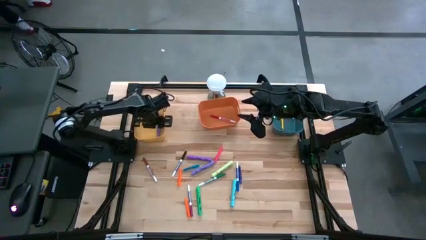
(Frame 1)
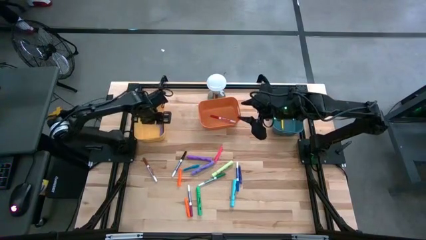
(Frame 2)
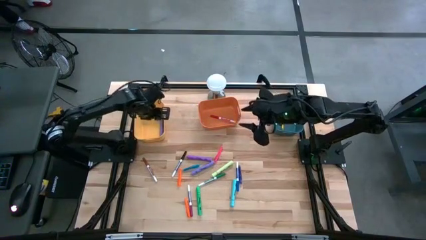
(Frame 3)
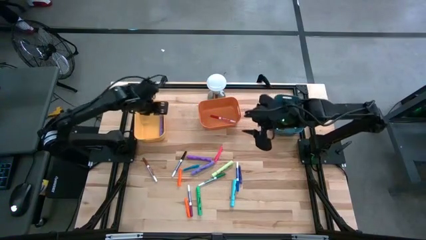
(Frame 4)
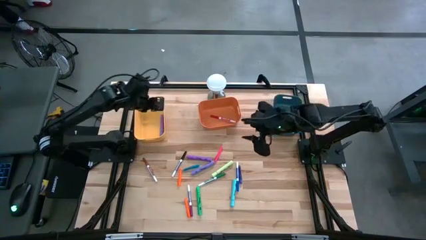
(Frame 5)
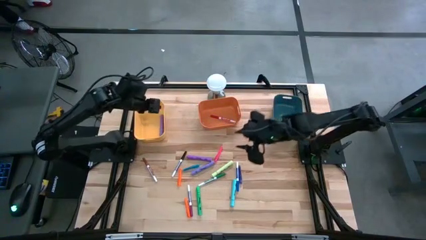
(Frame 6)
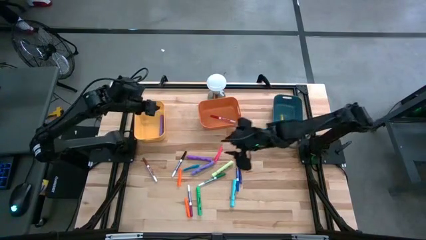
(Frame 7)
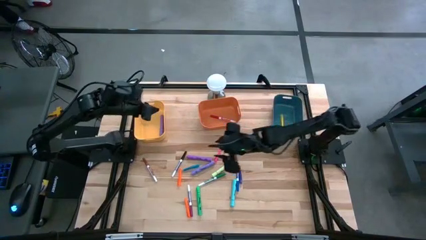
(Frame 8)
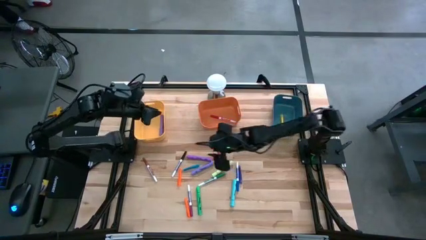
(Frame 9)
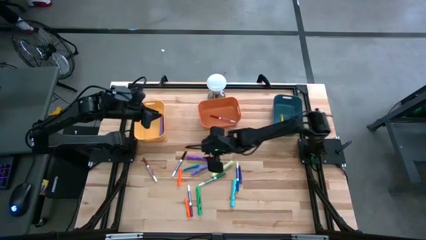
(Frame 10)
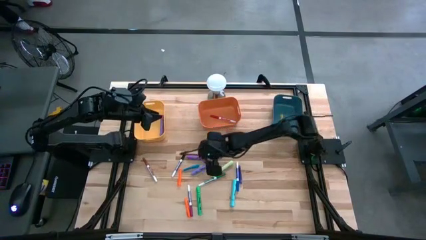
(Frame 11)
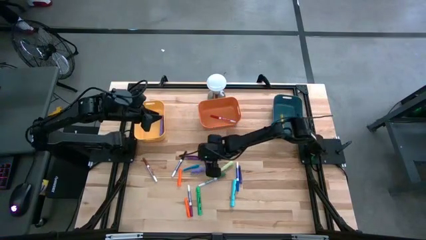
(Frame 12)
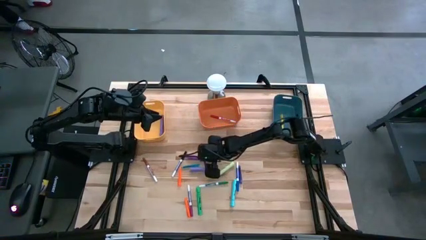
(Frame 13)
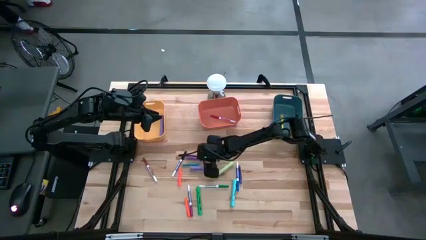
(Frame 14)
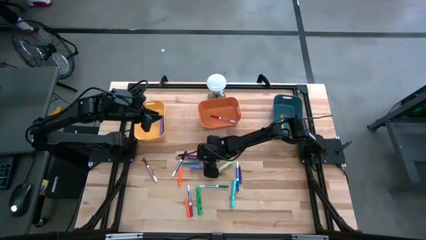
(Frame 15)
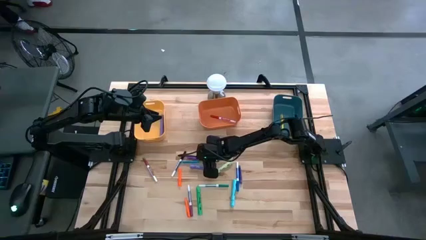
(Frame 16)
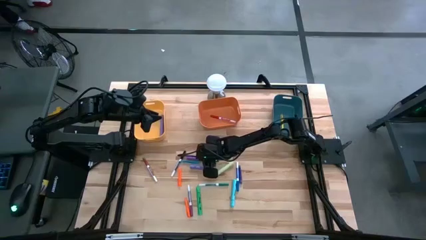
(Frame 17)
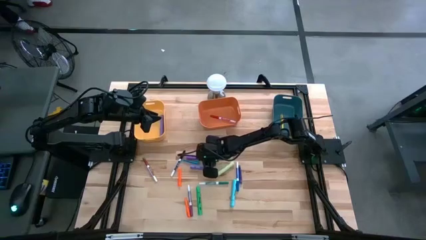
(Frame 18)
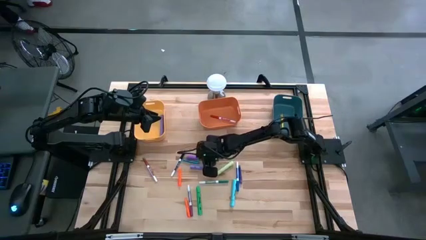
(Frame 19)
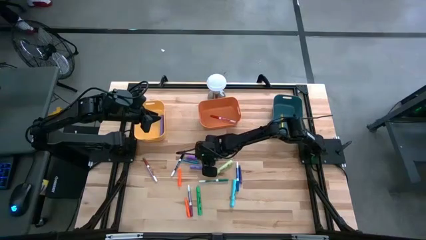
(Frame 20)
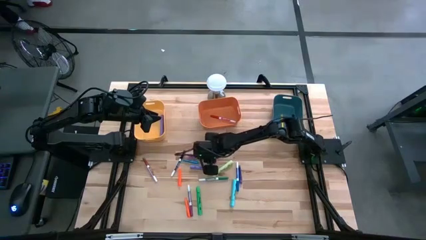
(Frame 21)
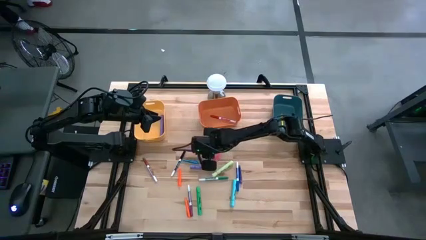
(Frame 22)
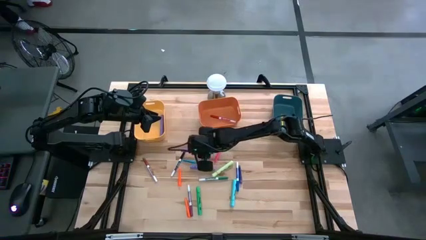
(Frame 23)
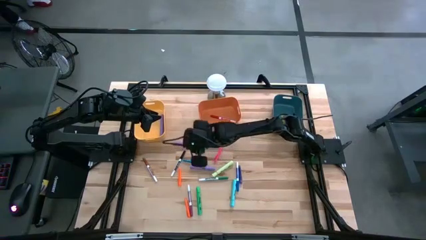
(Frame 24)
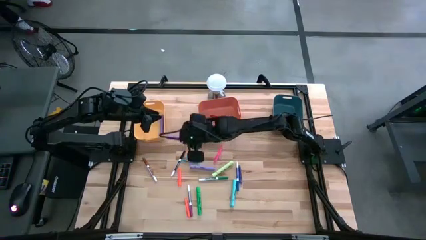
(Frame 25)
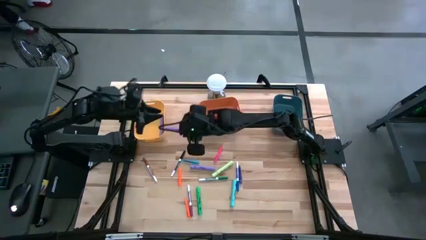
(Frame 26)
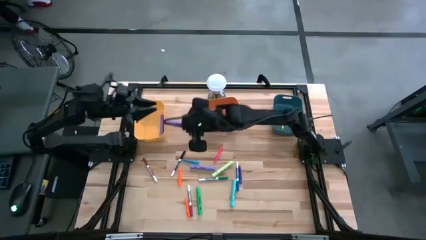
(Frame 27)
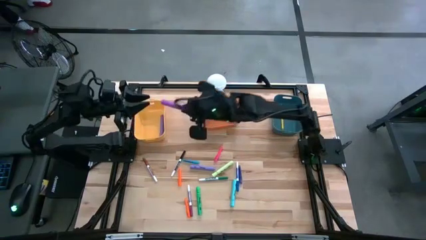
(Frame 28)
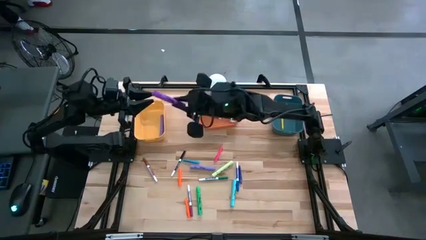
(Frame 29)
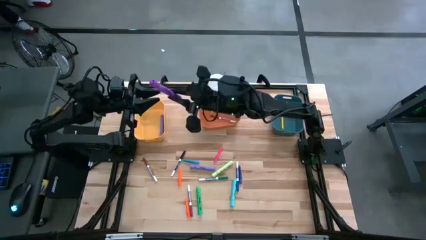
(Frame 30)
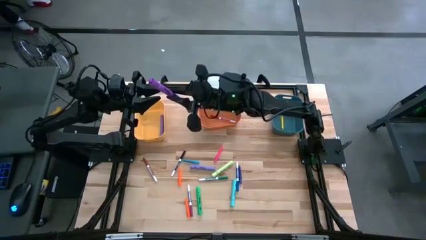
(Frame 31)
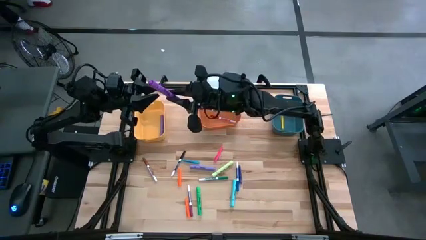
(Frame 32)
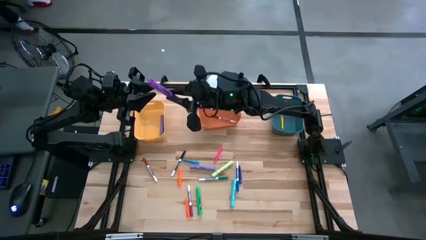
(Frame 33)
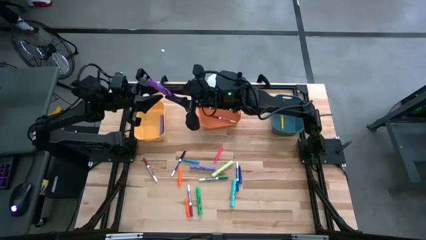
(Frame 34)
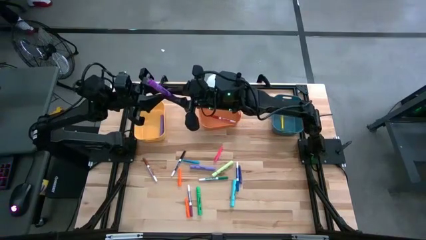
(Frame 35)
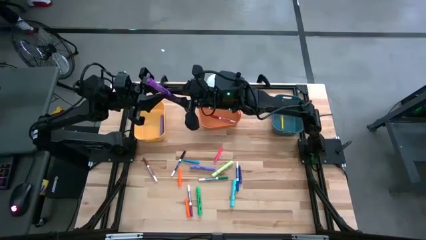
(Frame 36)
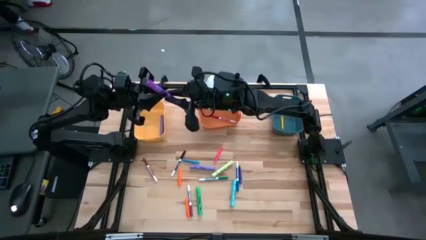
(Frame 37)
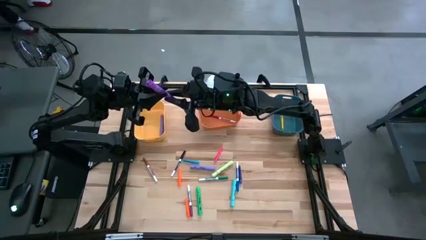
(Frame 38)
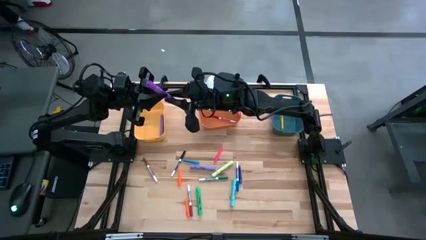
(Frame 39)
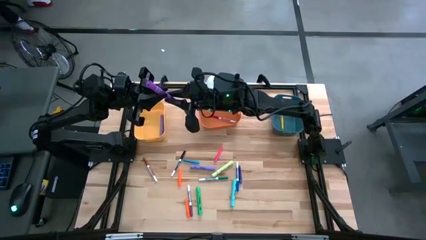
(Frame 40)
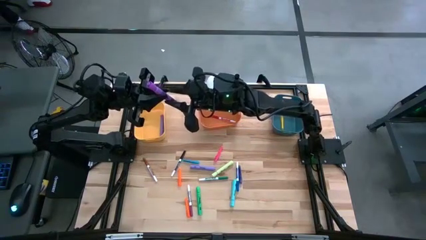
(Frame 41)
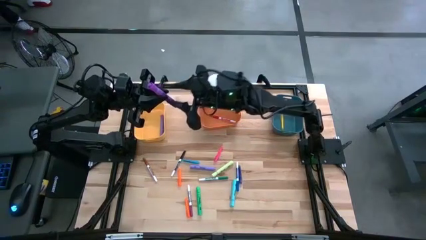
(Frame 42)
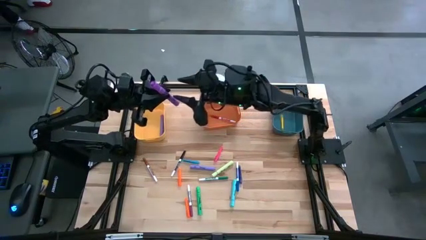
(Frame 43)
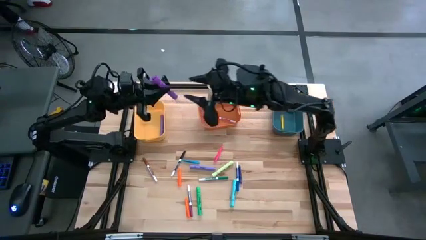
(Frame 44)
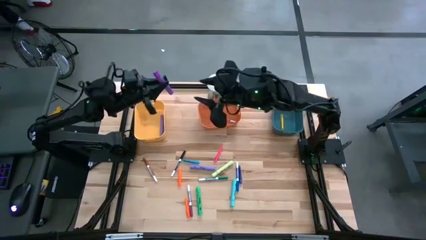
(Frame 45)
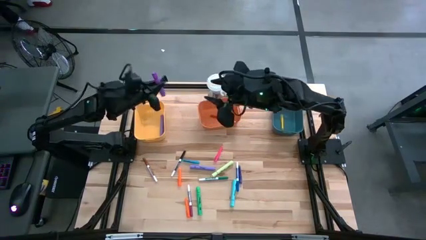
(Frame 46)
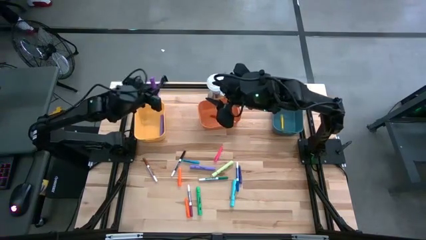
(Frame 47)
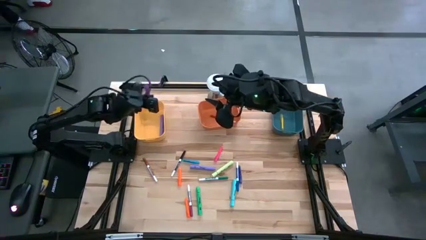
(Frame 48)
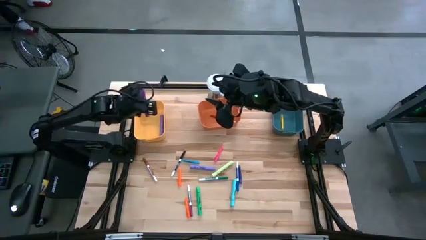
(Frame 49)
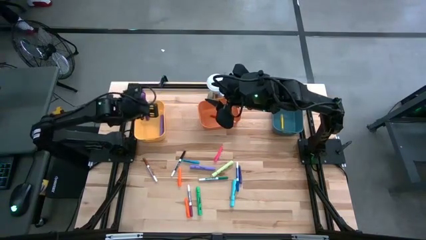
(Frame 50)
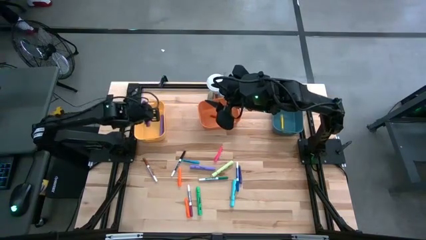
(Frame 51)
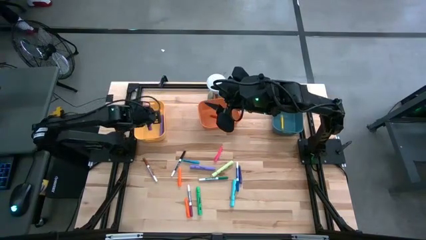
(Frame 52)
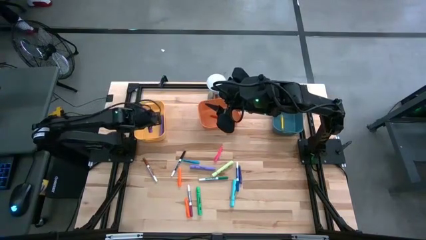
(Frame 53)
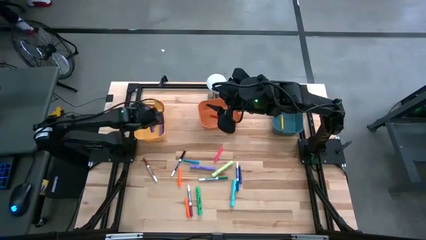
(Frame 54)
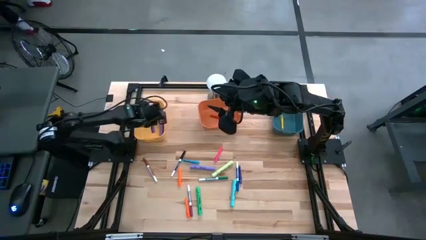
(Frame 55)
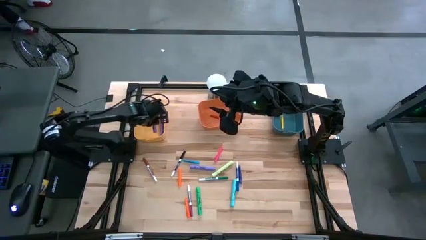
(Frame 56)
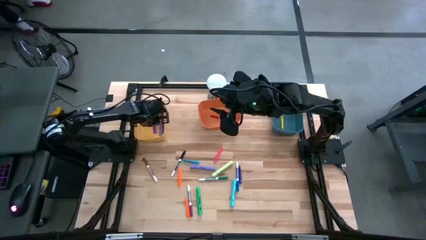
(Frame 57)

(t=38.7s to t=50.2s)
Task: Pick & Place Markers
Put the violet highlighter pen into the yellow bin
